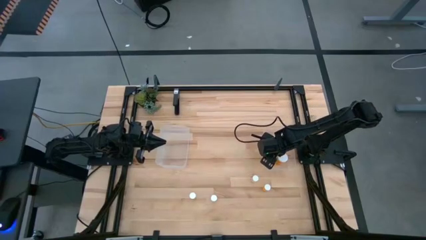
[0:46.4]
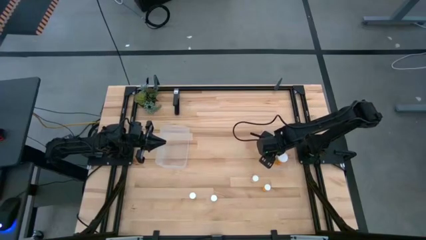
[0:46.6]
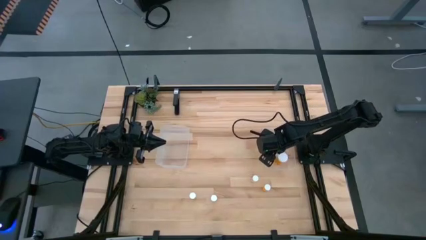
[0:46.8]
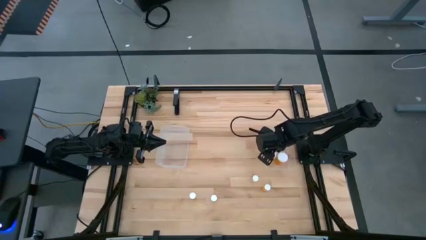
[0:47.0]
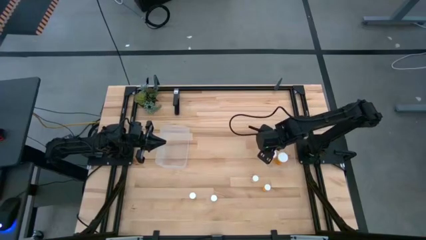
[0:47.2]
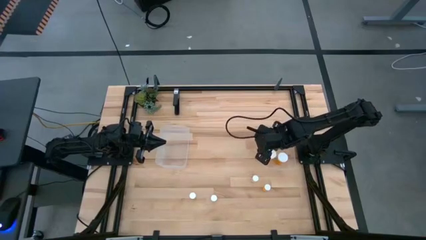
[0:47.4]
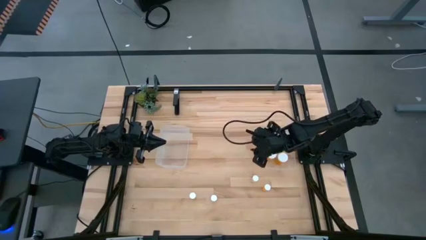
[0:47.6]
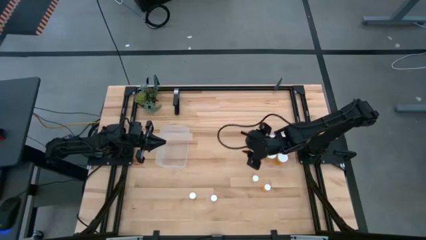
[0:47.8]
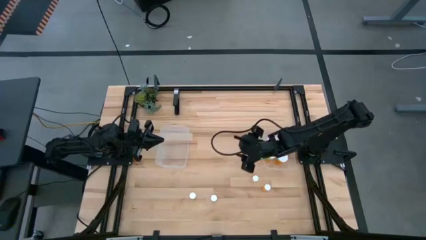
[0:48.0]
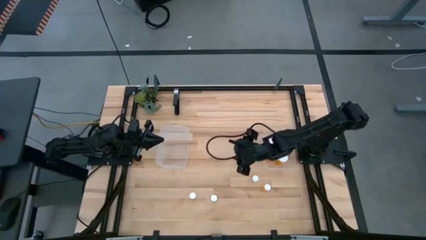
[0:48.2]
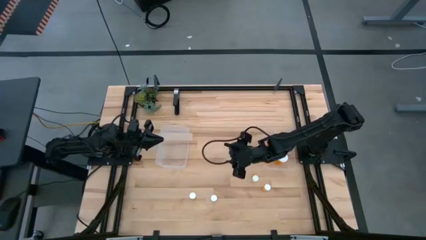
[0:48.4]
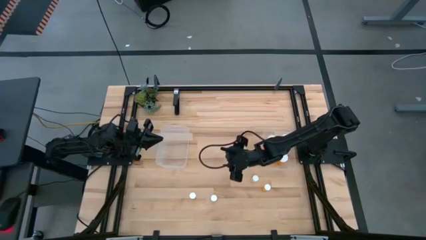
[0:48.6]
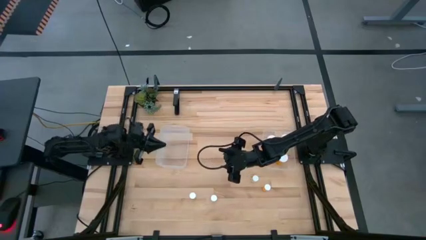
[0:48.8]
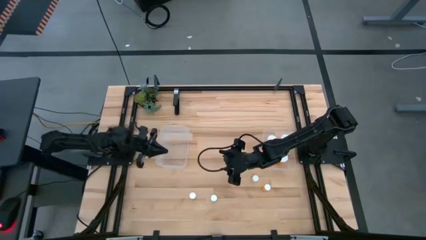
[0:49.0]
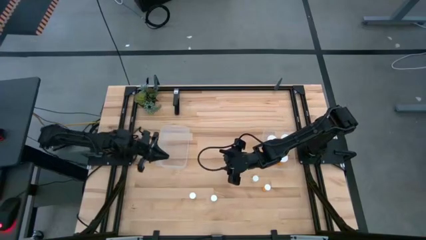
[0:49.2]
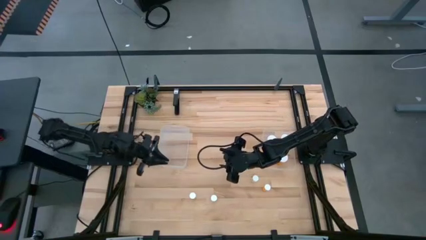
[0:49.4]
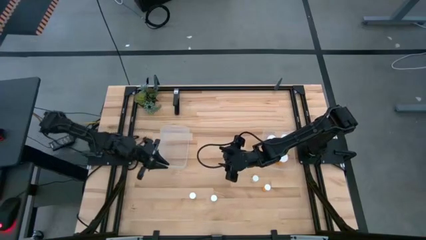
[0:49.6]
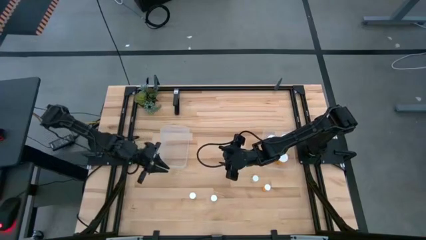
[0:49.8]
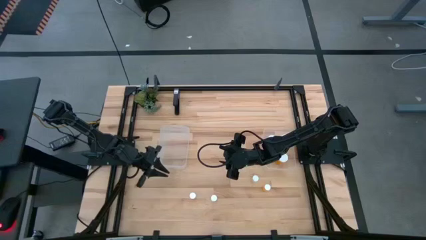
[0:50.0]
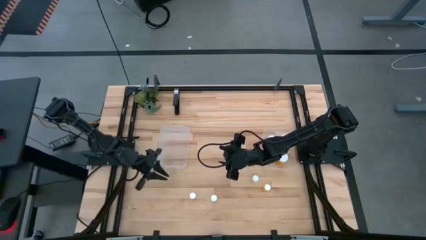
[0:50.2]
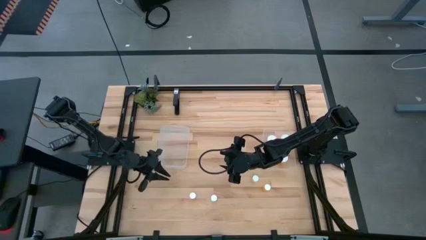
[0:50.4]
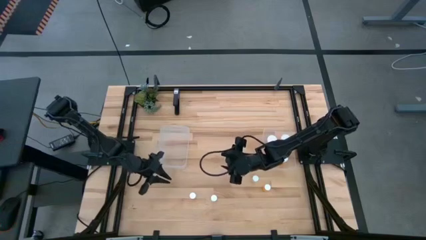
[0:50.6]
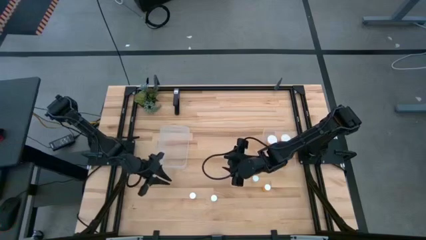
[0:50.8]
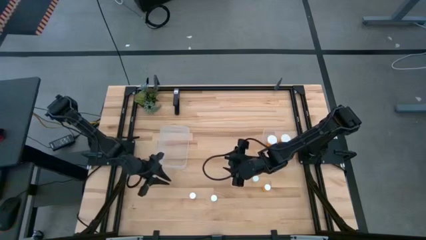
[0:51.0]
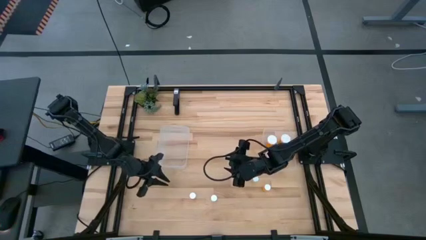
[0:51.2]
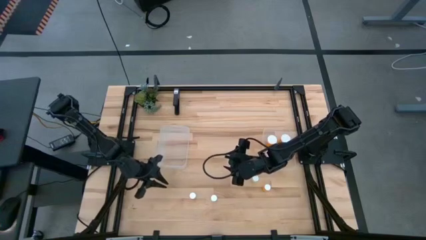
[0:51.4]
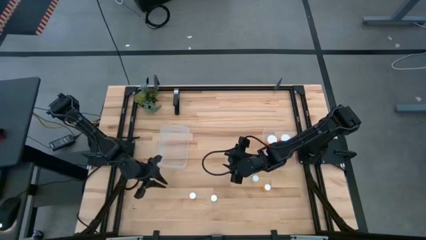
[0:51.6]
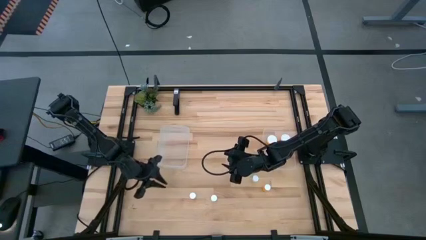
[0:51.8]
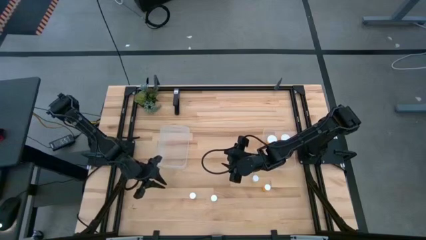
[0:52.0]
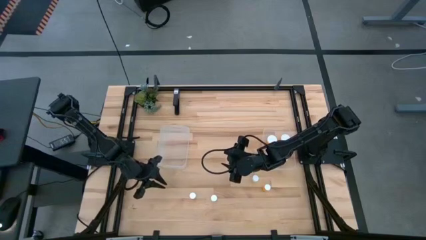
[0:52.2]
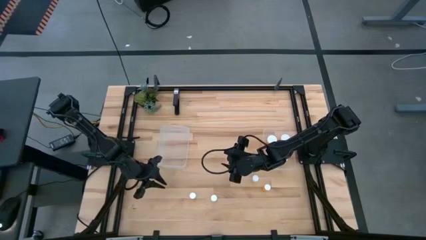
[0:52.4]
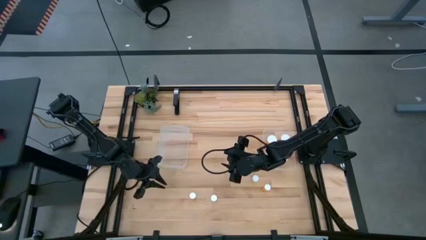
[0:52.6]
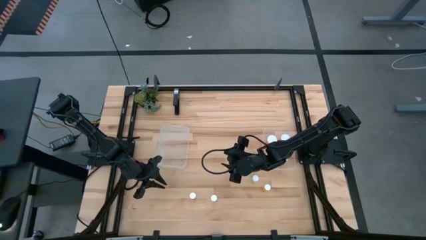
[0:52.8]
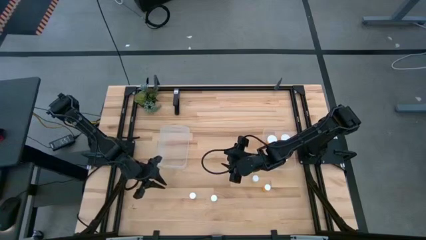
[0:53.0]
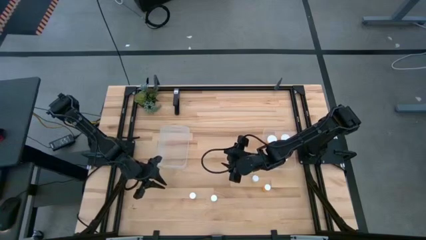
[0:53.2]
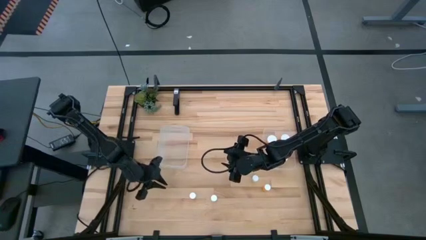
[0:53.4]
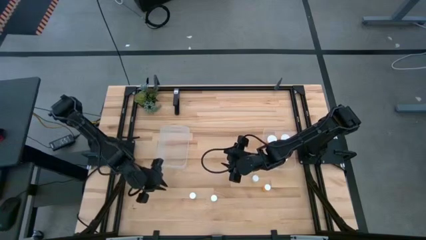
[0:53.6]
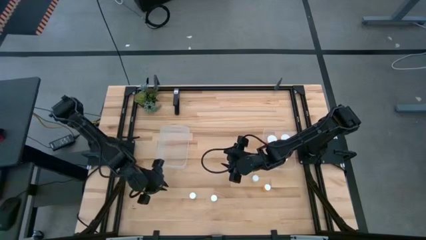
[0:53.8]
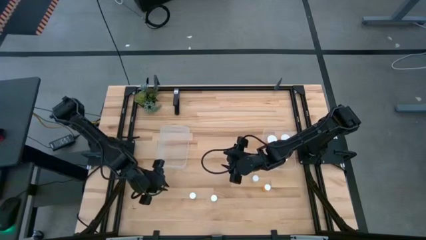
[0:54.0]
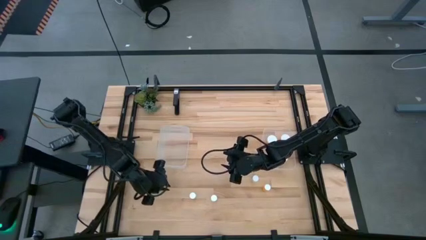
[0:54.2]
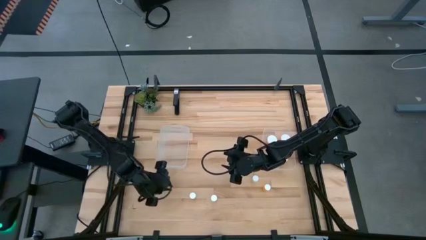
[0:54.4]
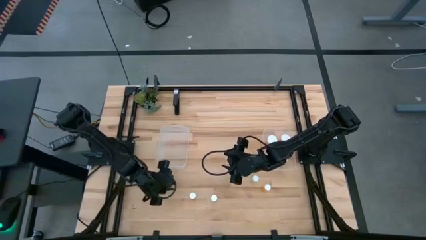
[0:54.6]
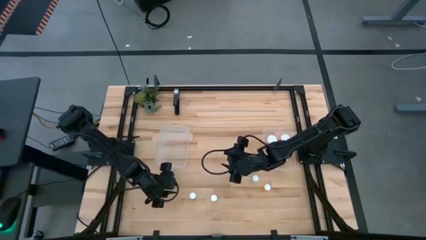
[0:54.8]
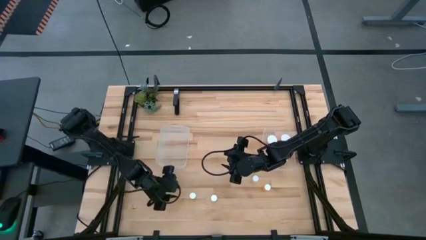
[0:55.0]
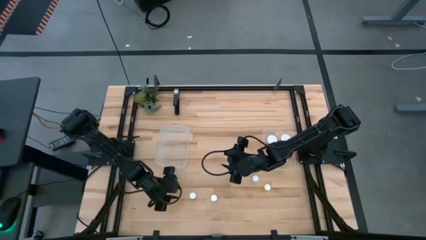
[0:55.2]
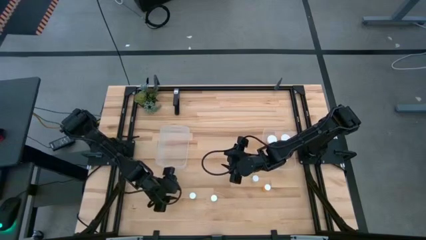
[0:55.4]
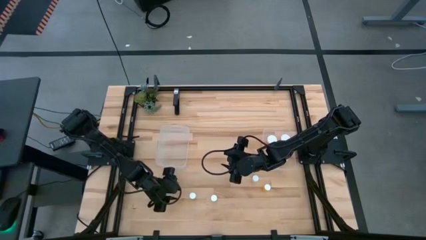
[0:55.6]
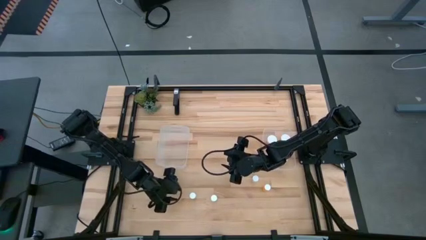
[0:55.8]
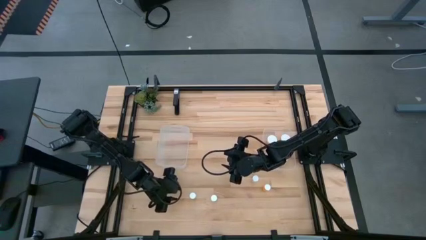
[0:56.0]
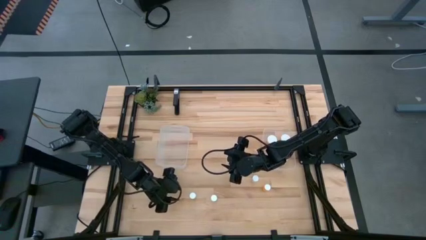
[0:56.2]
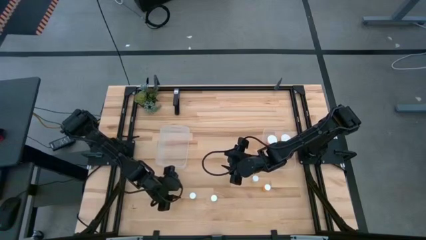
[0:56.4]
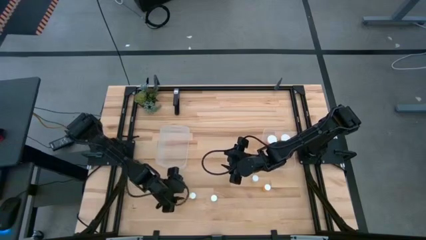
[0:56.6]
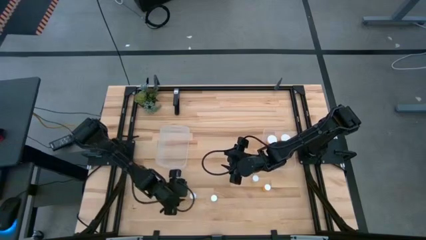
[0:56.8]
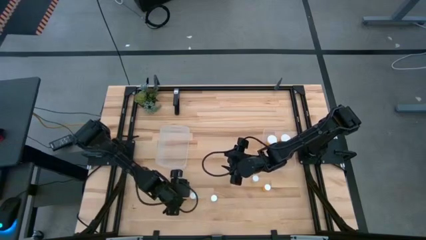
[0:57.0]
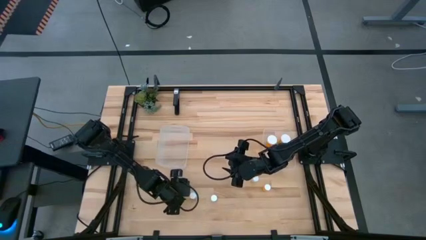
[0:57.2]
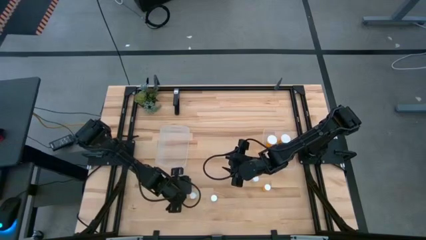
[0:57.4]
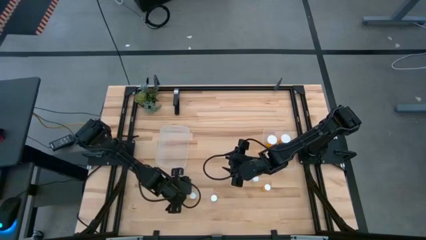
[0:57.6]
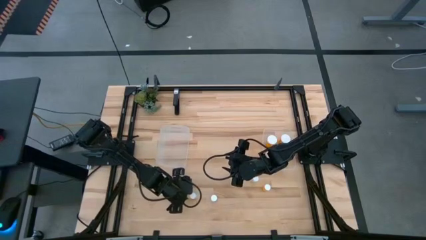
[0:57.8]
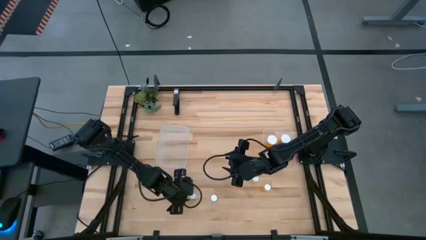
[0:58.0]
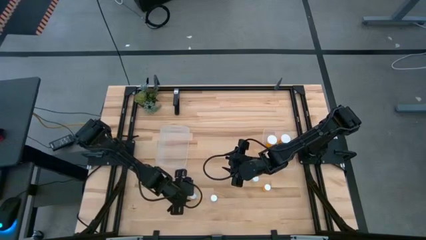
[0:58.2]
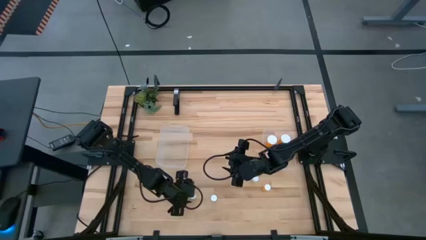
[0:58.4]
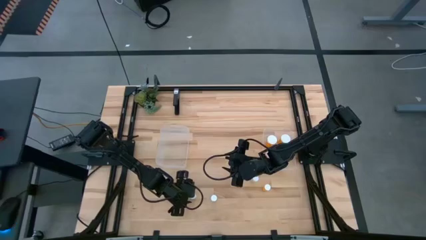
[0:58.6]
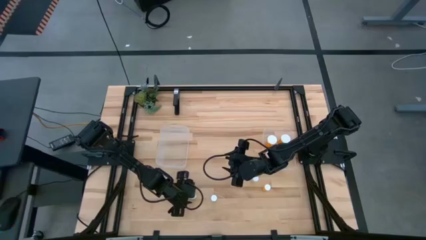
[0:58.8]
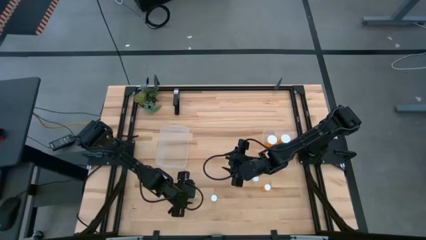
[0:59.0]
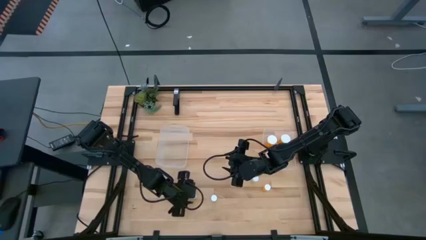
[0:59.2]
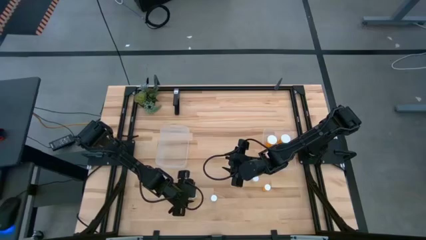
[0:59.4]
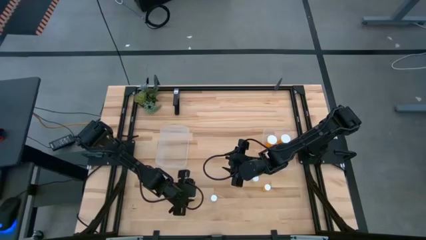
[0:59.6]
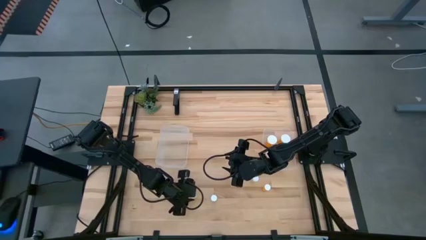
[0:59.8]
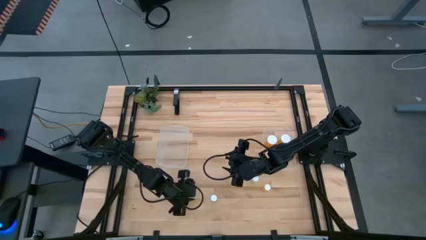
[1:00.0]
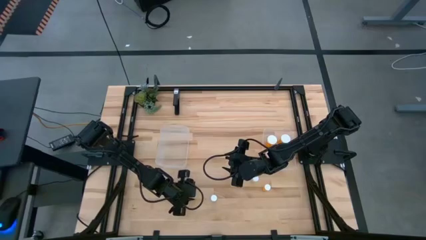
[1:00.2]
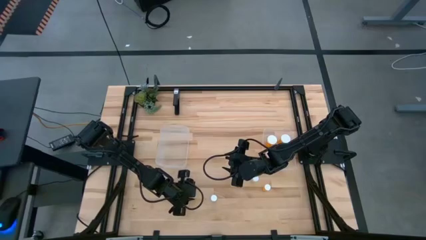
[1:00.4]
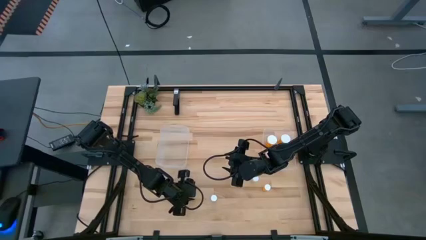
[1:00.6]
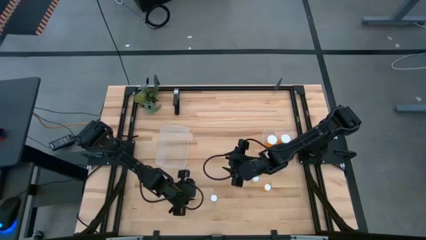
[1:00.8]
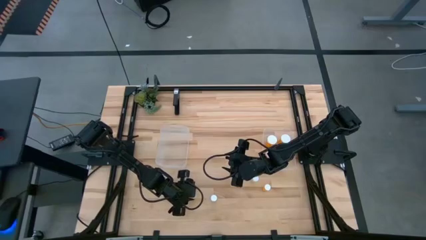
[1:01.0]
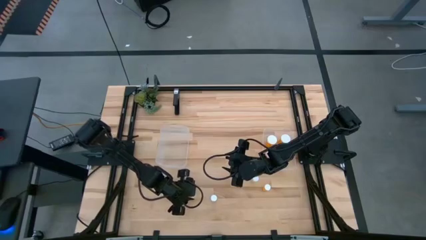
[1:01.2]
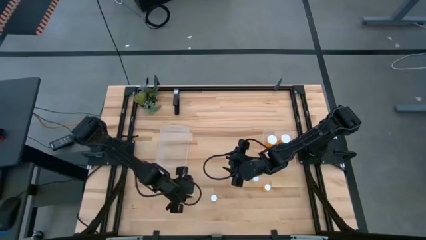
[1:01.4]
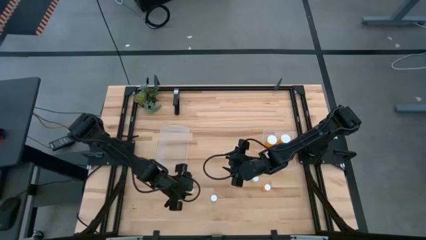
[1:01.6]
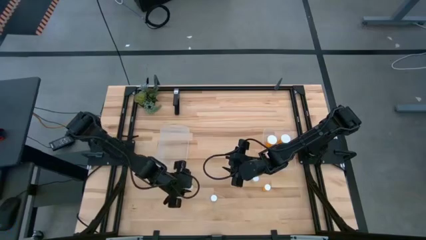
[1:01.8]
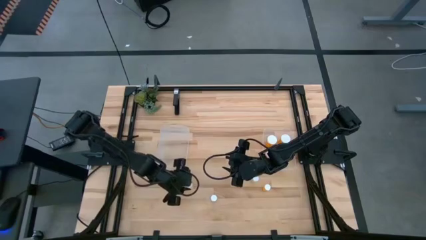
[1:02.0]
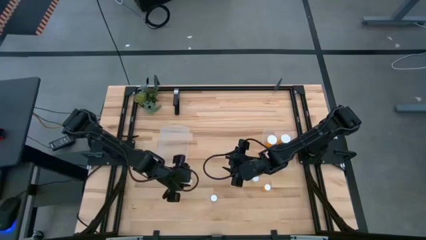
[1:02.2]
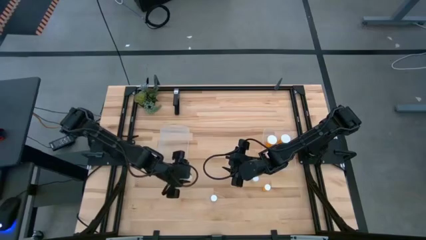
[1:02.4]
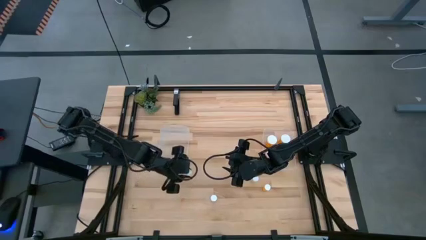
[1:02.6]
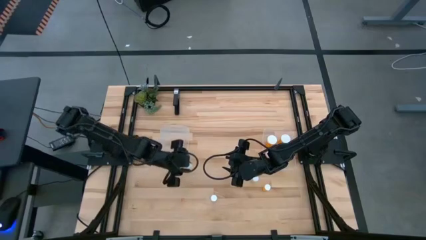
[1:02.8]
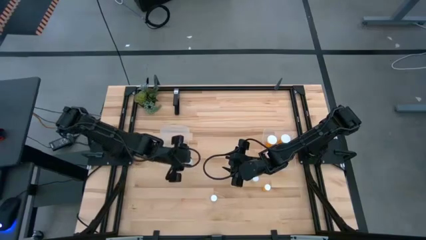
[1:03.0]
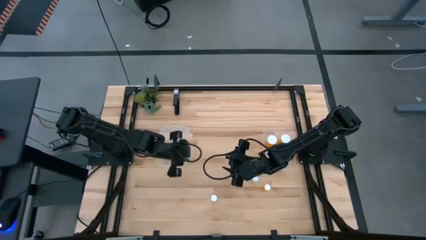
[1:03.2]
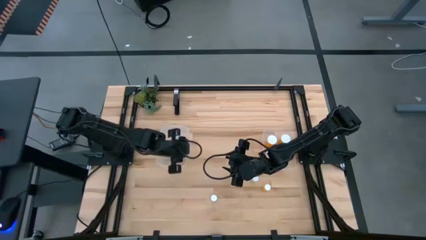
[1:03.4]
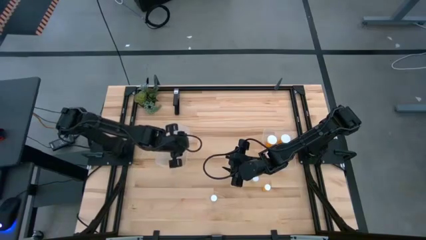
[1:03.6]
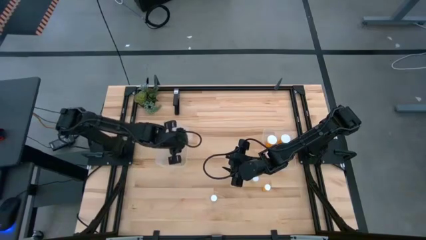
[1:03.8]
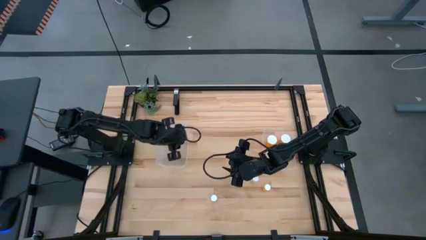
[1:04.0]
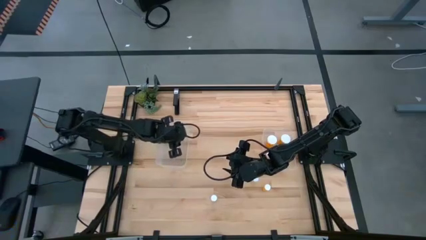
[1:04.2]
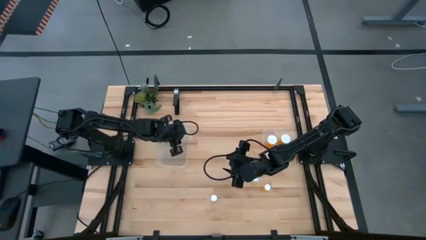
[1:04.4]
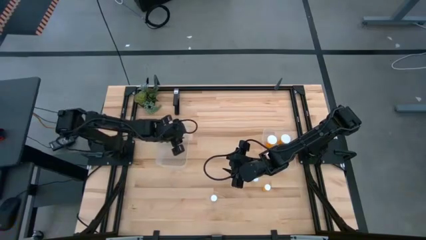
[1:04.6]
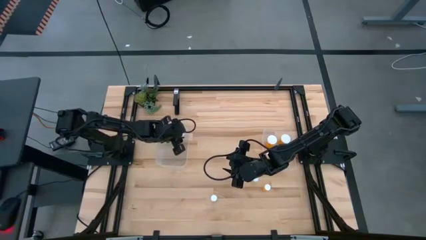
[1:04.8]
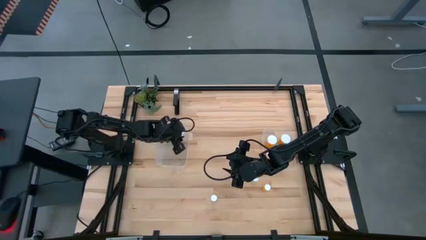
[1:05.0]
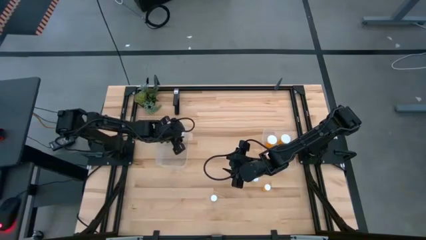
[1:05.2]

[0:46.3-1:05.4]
Task: Pick and place medicine bottles into bin by pill shape (circle, oval)
Put the bottom left yellow pill bottle into the left transparent bin
